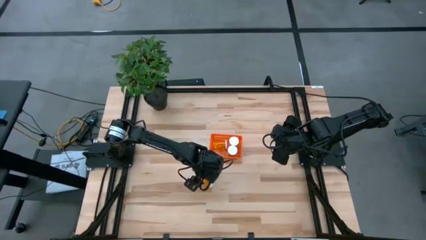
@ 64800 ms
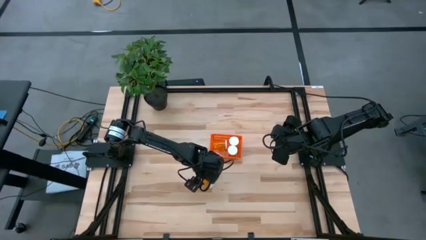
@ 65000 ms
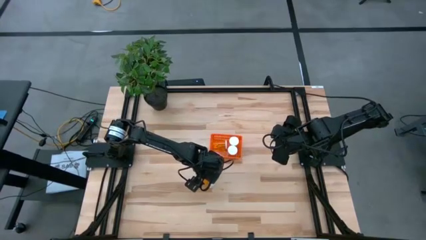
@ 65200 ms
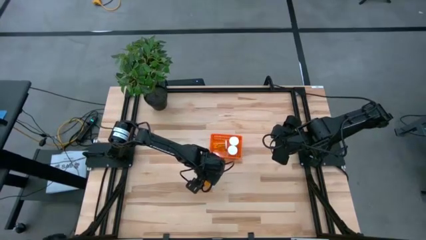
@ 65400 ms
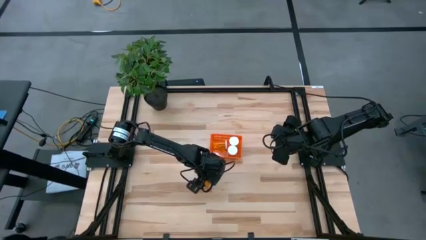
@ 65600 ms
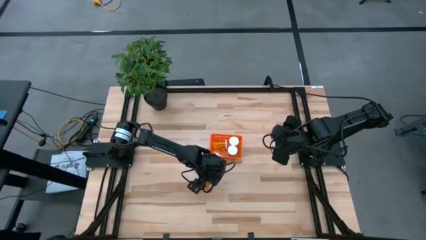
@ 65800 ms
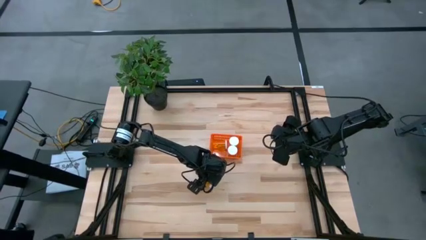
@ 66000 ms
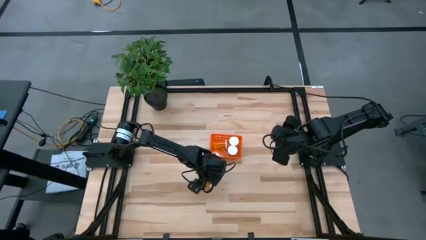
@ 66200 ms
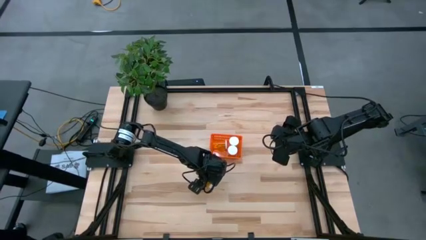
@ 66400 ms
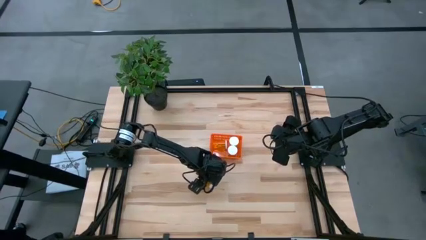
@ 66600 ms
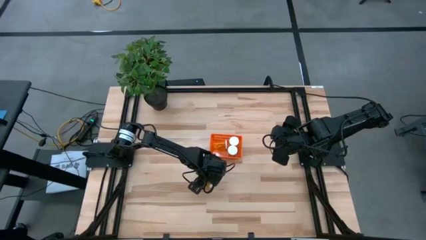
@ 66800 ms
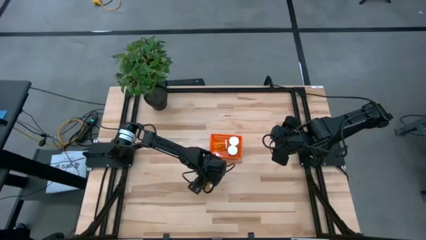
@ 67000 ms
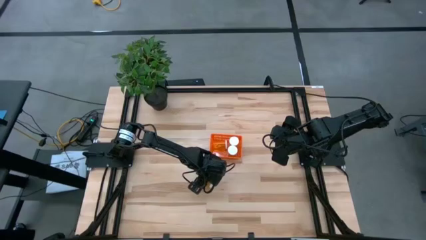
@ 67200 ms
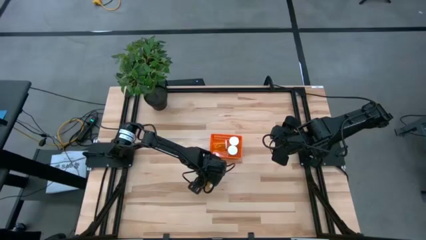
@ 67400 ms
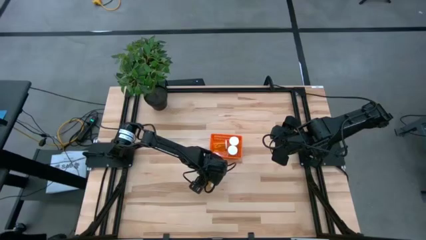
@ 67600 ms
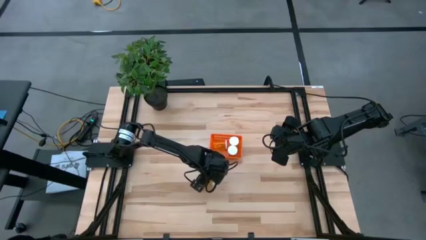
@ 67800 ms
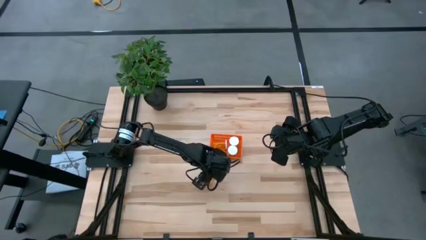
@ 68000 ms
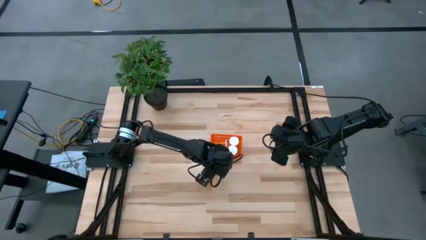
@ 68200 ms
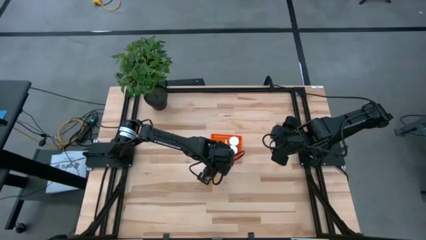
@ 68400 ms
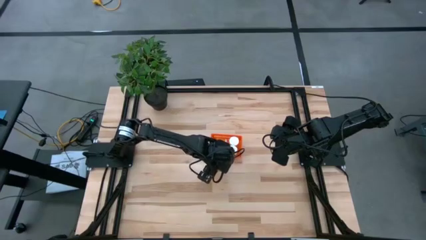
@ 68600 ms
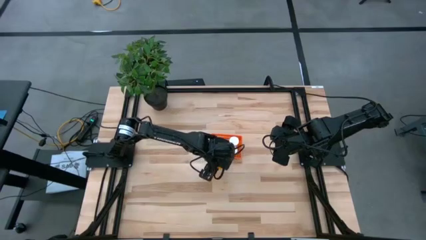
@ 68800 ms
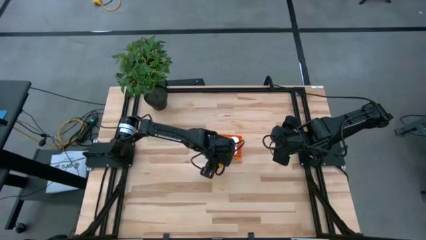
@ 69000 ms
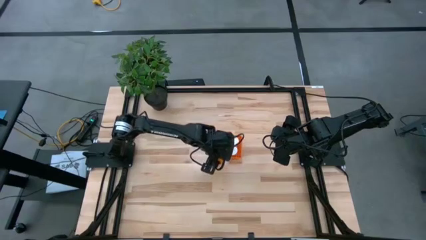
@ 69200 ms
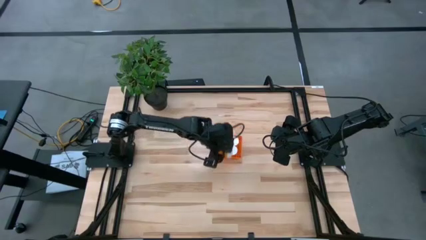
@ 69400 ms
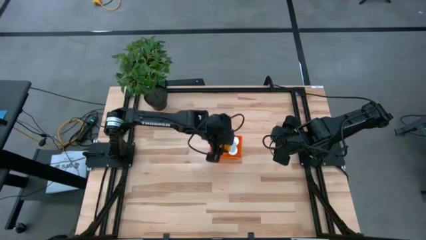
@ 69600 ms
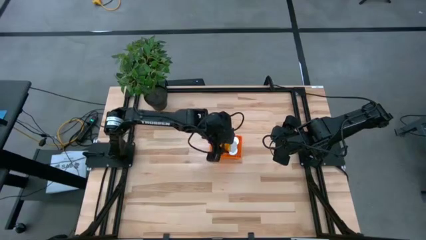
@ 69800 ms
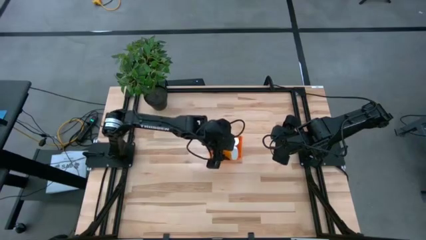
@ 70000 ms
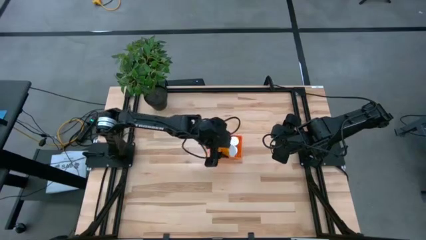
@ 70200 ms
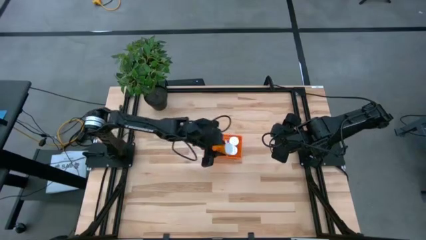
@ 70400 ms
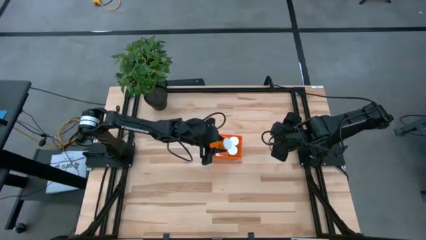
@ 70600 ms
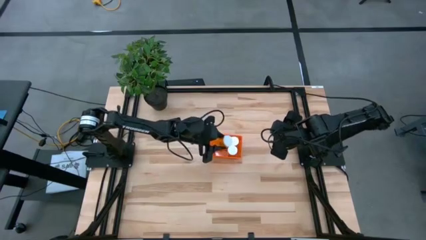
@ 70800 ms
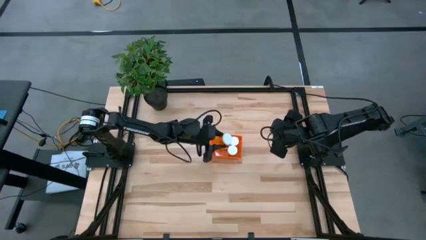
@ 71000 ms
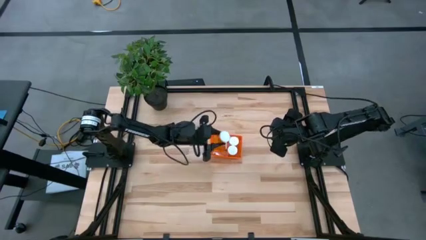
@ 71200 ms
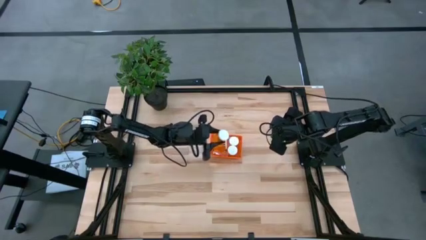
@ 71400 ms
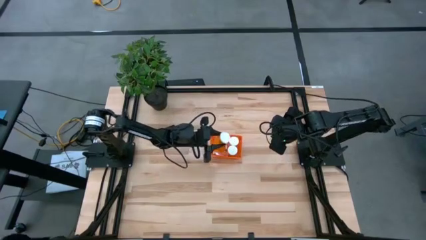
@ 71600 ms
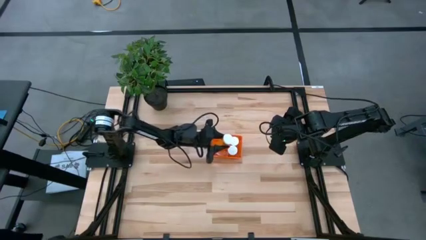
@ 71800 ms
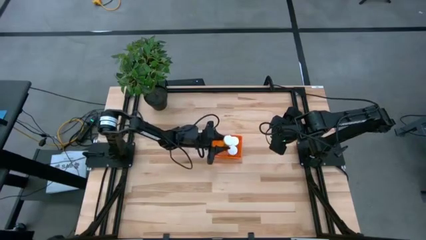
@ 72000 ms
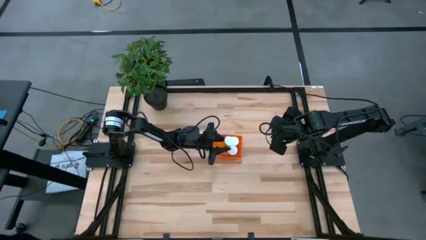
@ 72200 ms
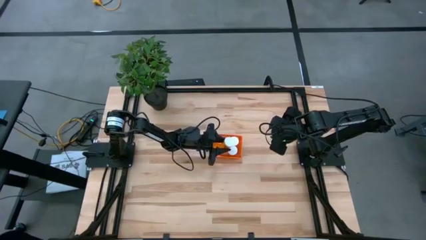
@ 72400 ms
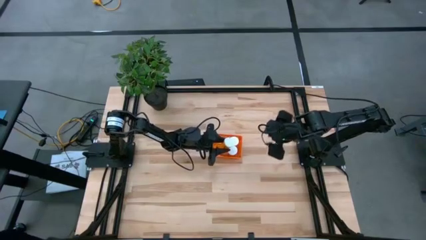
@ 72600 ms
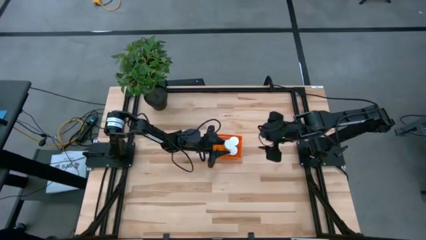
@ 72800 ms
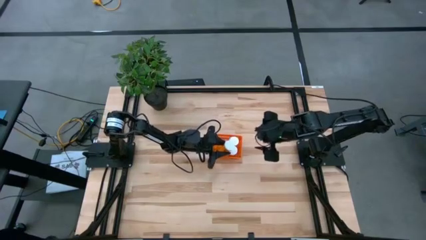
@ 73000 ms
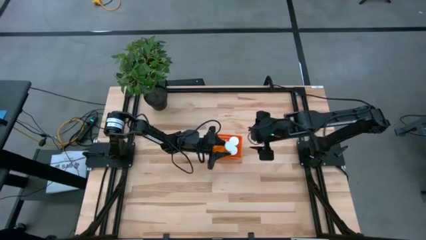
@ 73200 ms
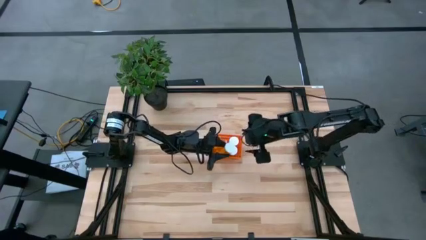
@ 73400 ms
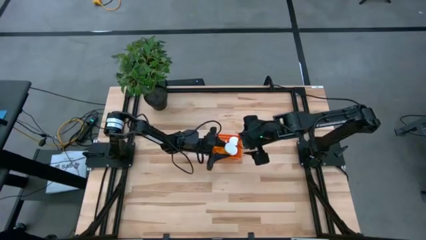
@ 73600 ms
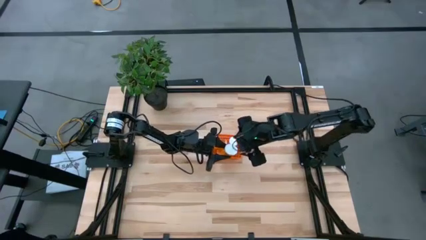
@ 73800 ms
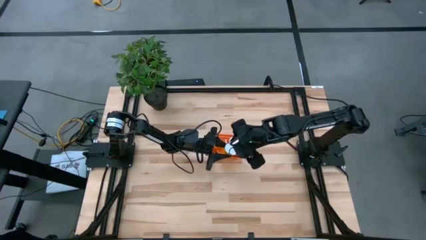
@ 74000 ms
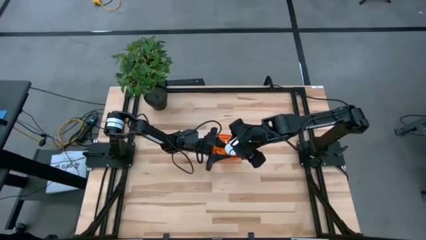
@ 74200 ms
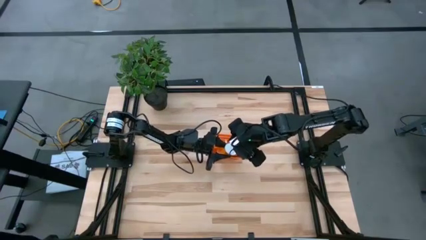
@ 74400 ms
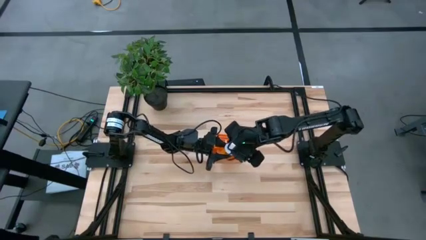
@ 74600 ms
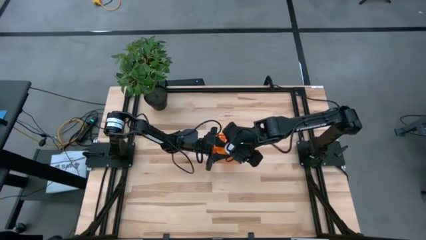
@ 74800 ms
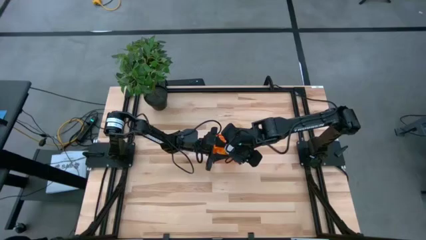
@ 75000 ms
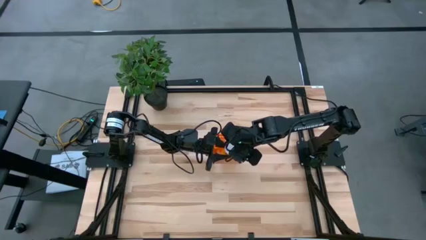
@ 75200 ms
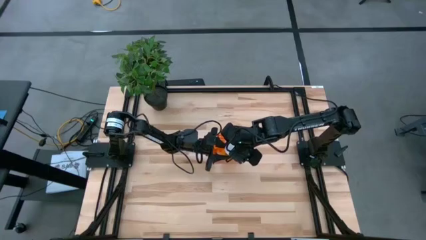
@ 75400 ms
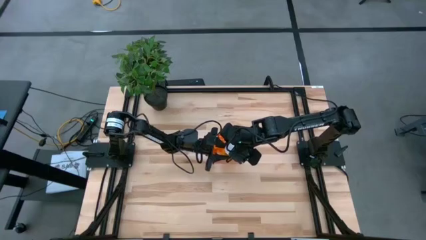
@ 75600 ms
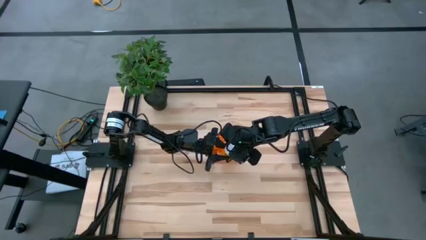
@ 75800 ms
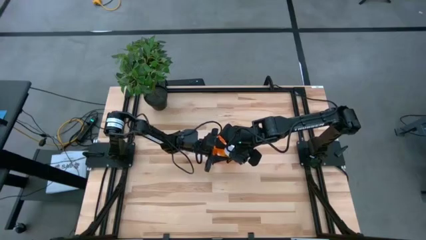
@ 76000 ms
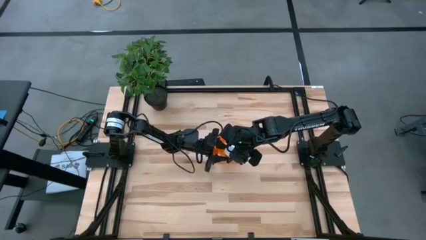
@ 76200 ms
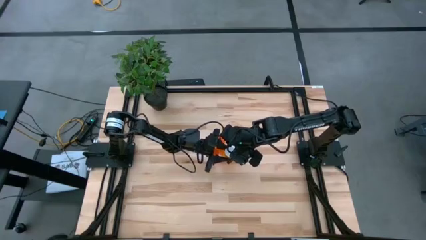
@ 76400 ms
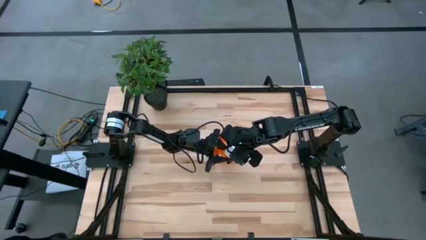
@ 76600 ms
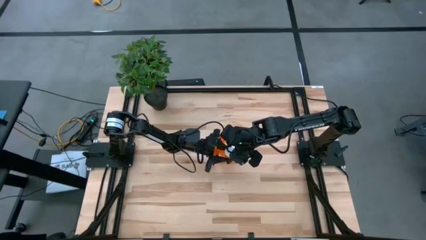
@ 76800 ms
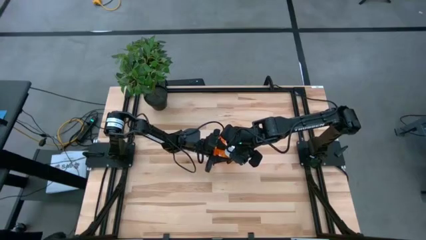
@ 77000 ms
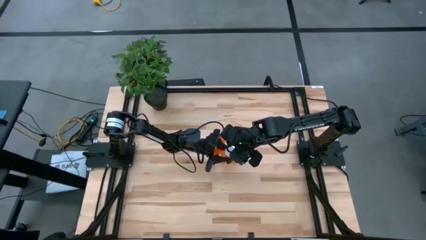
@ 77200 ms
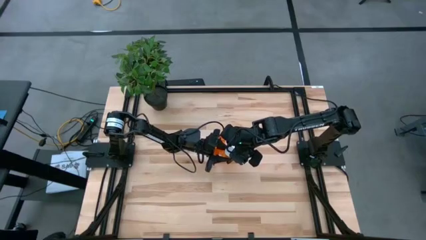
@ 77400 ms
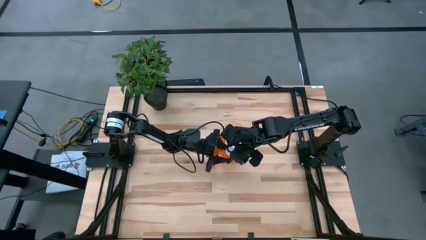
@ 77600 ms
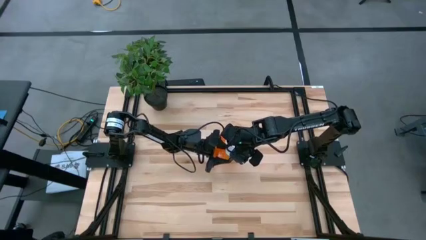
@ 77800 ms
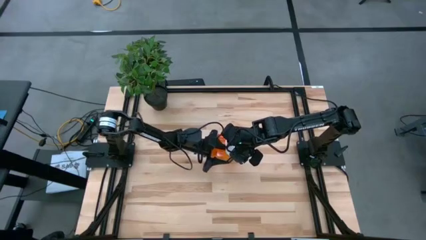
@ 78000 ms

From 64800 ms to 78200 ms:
Task: Pick and place pill bottles into a basket
Put the orange medicine bottle into the orange basket

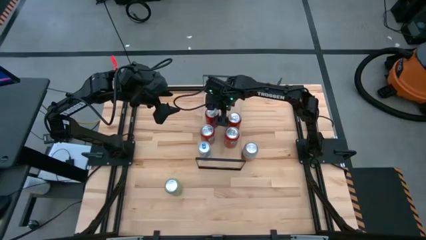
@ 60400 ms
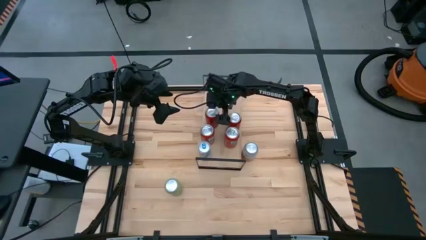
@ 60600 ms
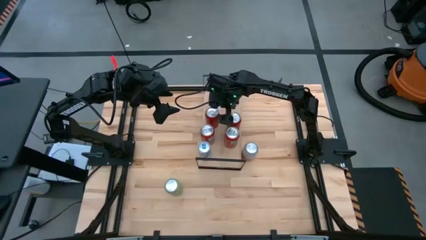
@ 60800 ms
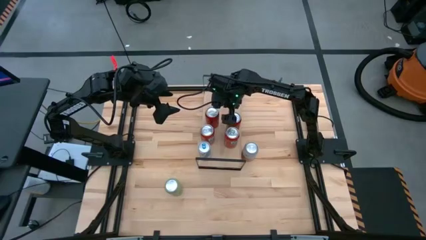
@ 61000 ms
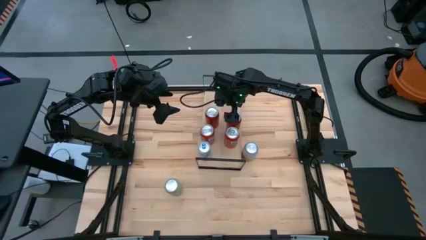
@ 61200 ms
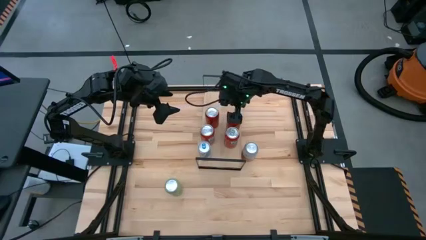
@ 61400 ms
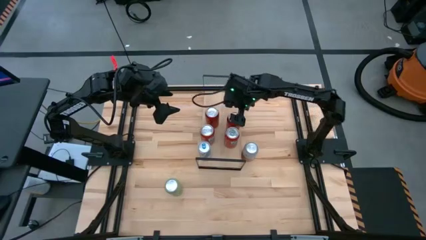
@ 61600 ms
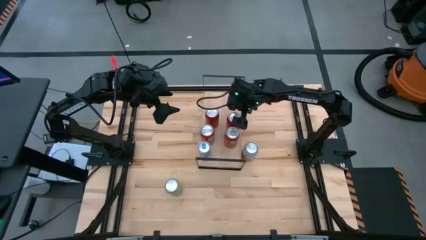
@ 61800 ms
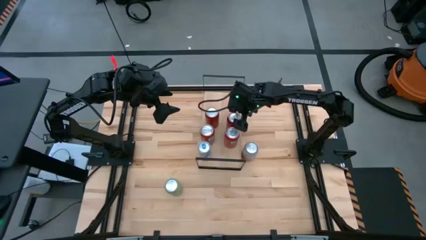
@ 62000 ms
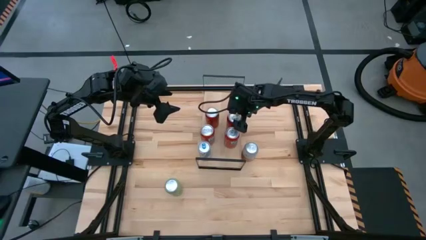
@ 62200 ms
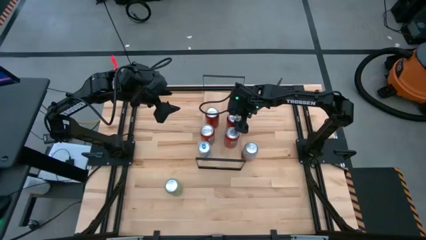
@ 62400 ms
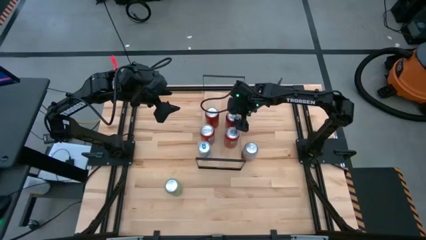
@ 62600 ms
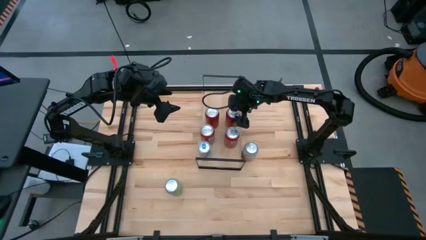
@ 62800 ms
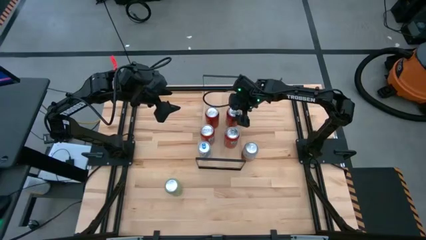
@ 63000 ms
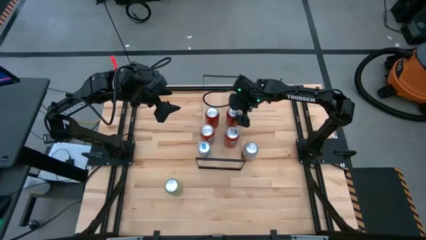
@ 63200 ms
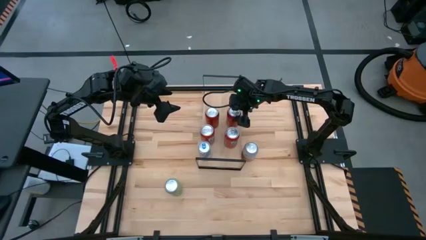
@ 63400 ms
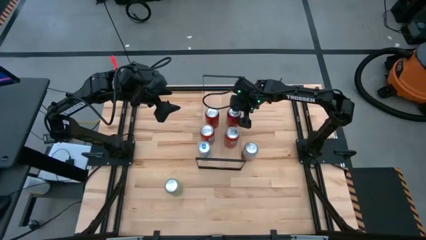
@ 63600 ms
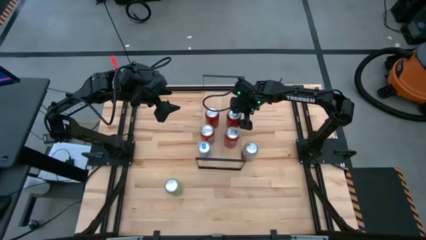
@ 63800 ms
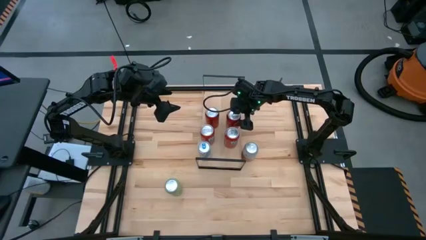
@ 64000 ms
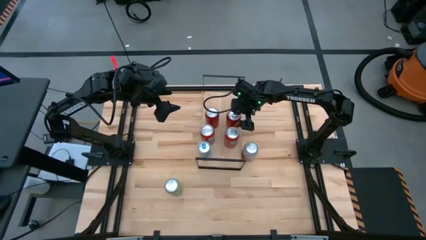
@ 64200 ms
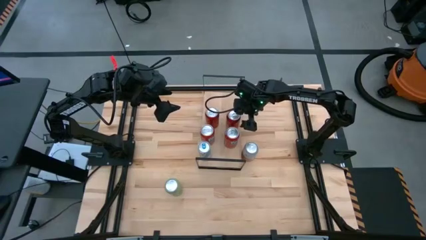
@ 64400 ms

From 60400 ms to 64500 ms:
Task: Place canned beverage on shelf
Adjust the right red black soda can on the shelf
